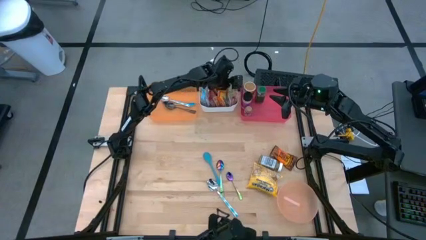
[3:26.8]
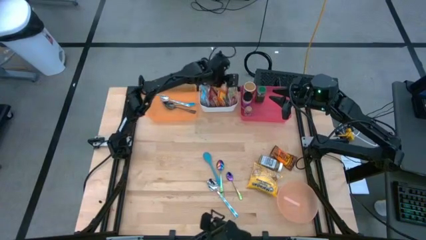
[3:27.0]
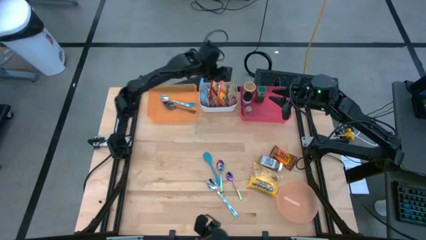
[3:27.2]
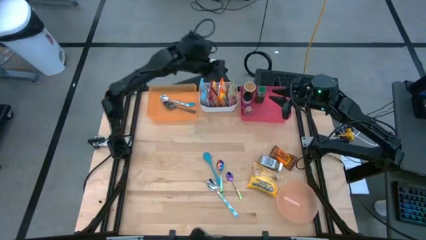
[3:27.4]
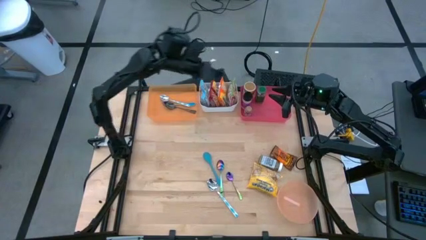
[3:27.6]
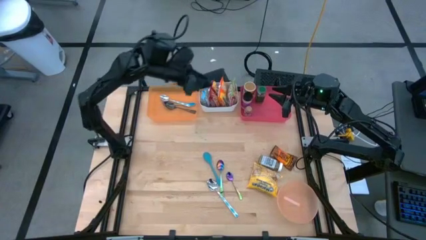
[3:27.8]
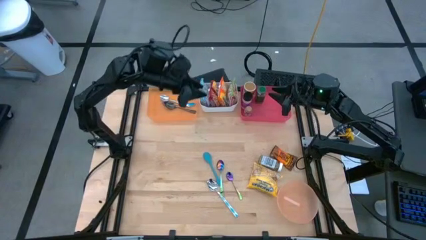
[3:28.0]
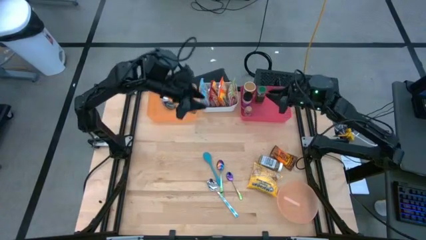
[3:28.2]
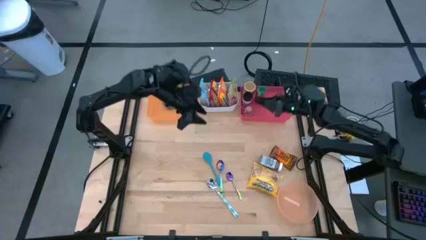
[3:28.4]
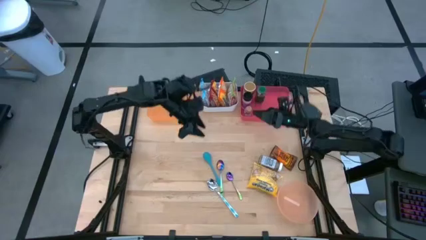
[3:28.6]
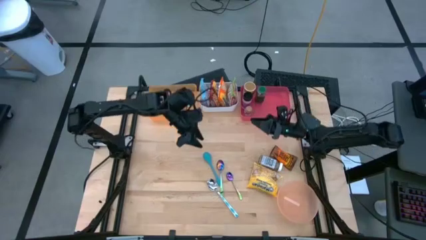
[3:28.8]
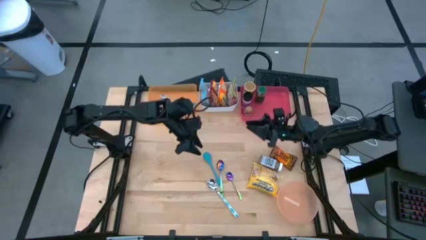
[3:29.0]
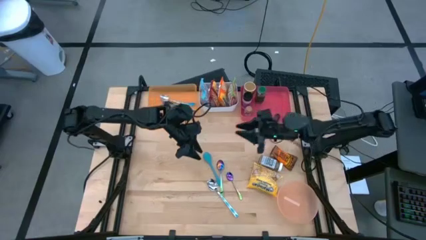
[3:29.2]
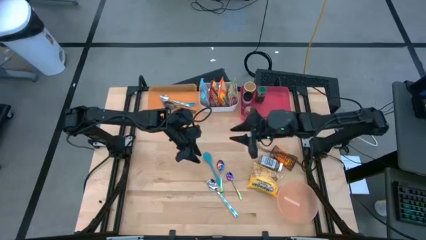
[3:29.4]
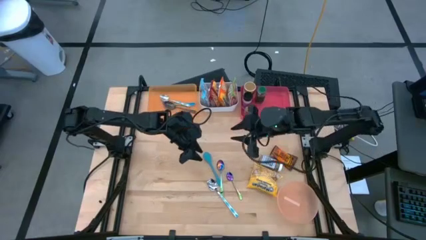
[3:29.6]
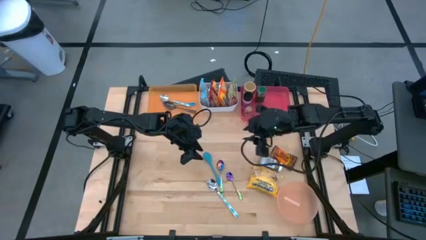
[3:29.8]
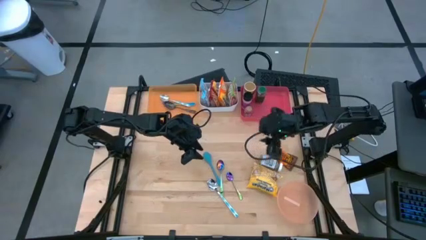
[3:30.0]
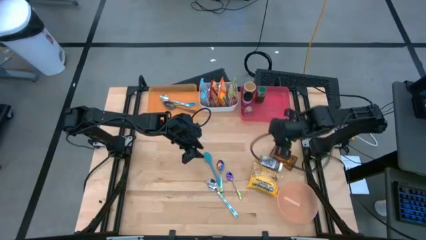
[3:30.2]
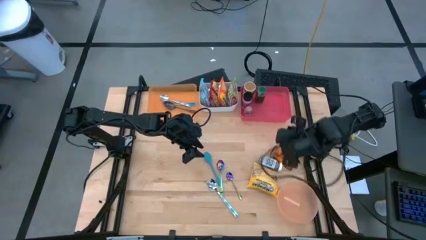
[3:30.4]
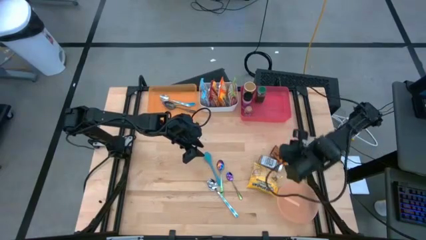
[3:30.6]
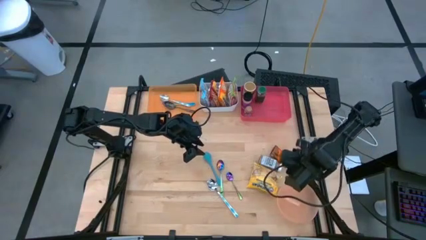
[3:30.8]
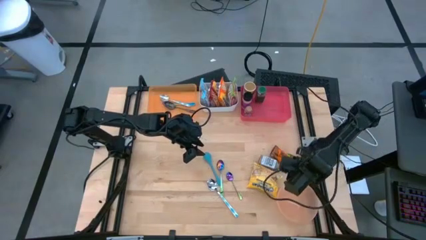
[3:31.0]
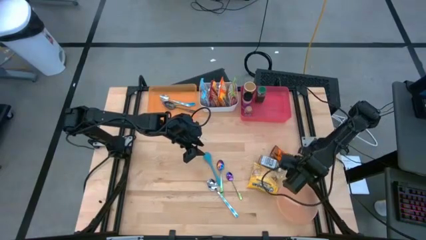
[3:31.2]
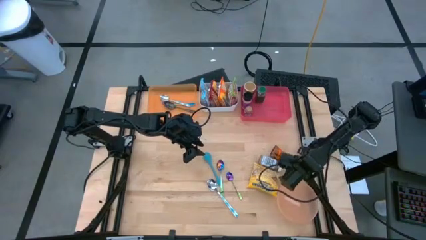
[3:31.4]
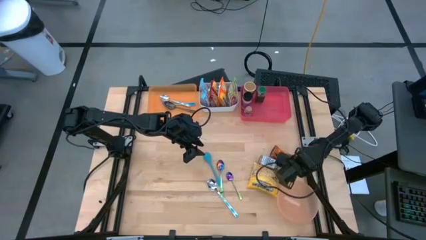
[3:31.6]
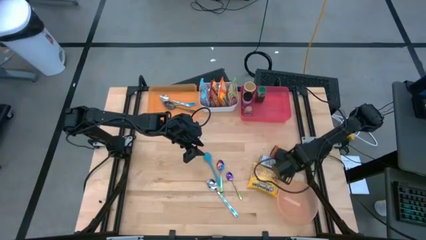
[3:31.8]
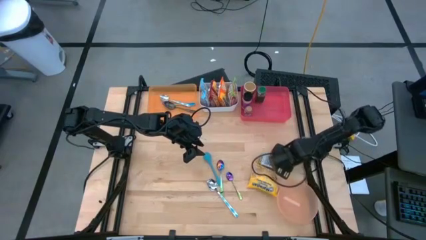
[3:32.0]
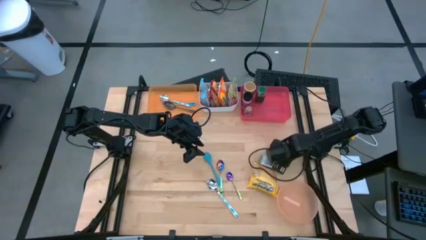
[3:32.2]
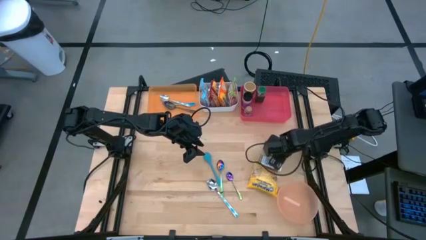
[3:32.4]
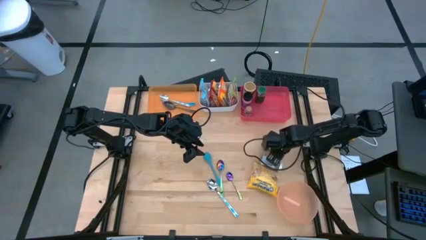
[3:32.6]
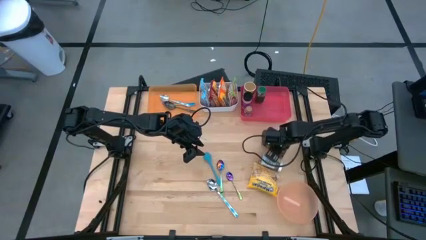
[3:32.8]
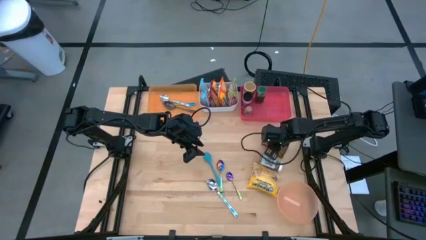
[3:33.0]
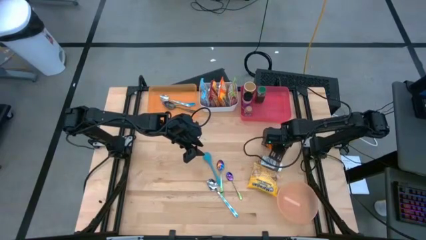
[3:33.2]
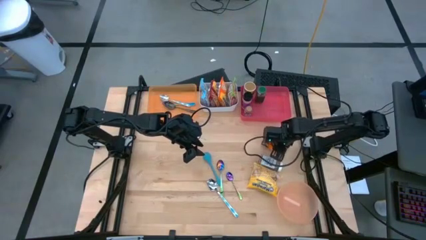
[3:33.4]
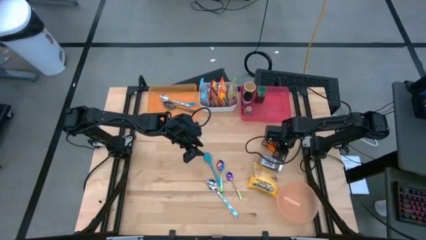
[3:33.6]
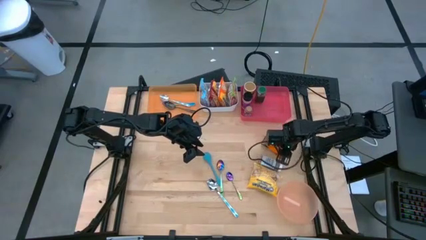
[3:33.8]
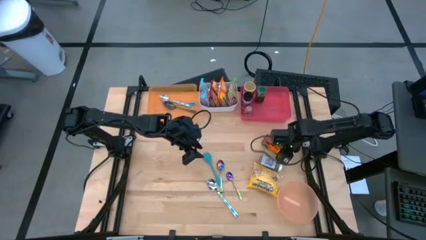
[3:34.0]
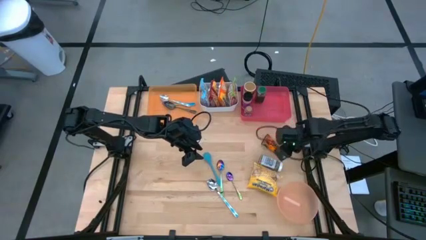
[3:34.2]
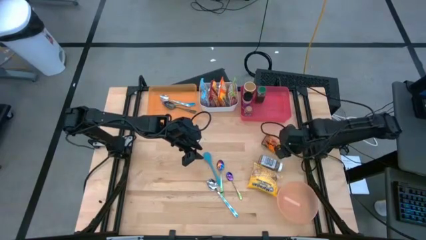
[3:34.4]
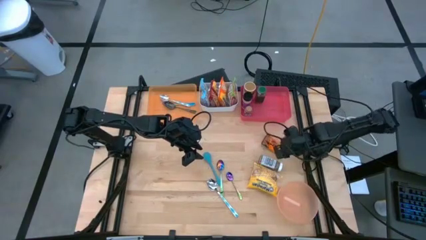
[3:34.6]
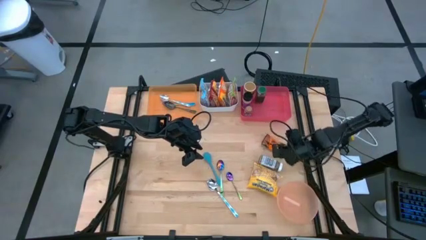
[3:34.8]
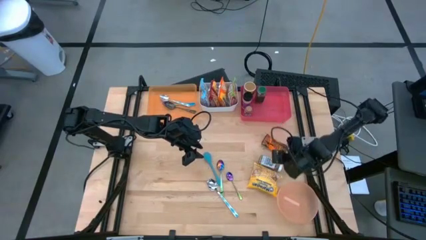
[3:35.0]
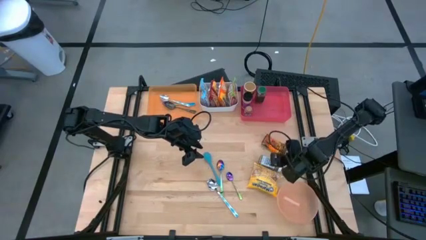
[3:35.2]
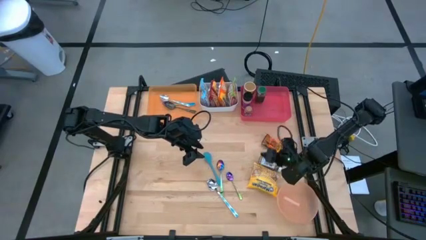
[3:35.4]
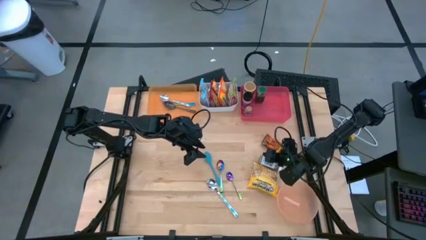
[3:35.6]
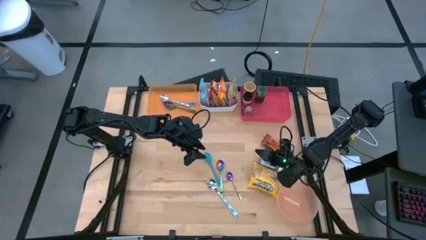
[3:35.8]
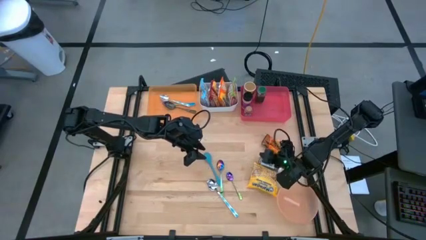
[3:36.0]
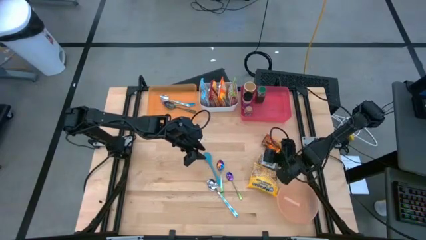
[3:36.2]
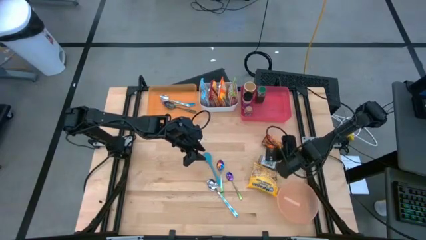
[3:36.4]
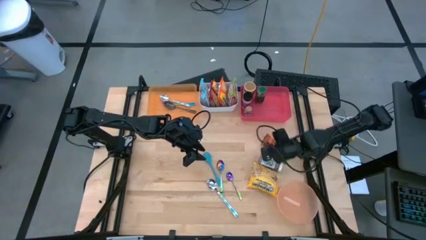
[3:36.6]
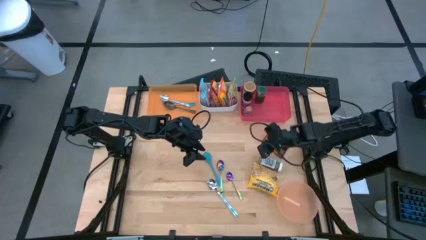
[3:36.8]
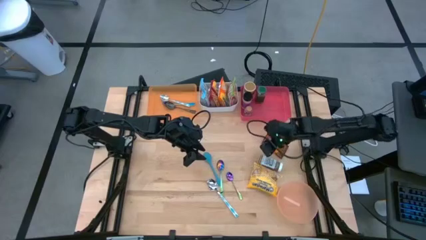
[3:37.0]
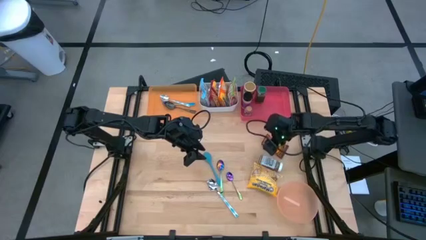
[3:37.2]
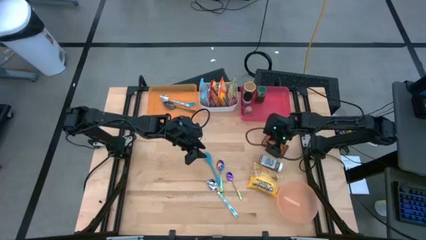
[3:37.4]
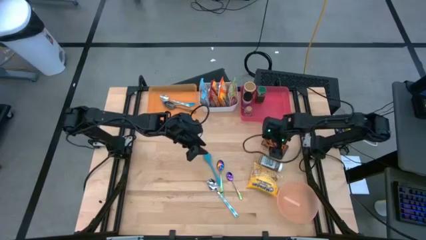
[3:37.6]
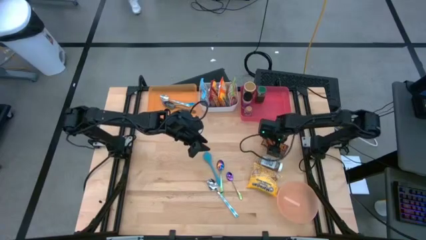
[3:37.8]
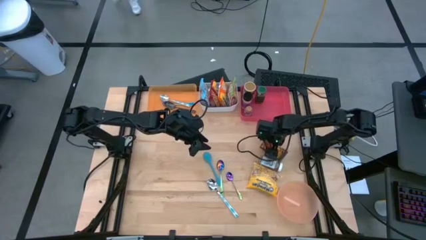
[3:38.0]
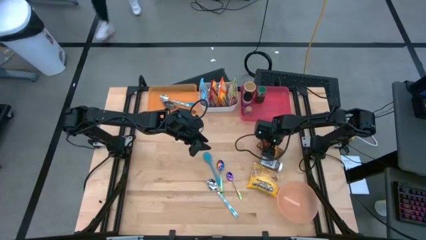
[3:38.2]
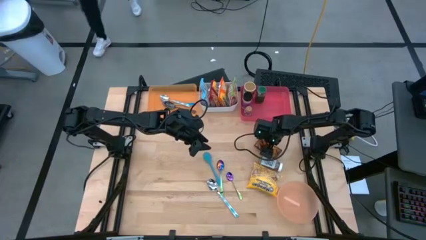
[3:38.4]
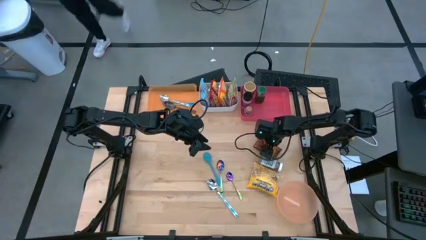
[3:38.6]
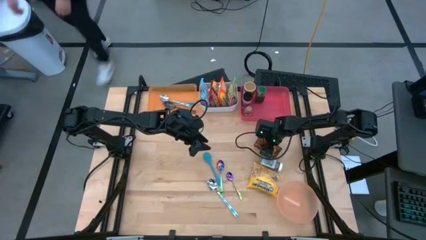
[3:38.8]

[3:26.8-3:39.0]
Task: Pick & Place Food Item
Put the orange spice bag into the red bin
